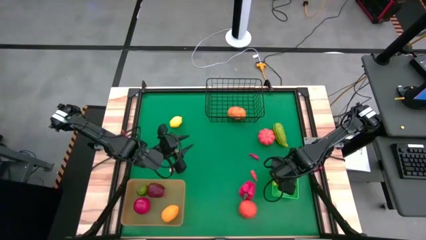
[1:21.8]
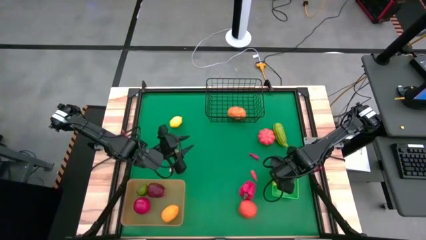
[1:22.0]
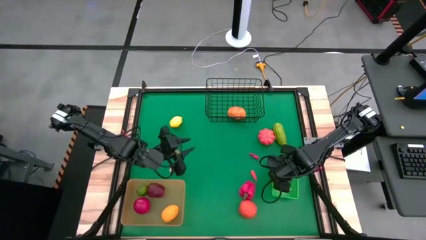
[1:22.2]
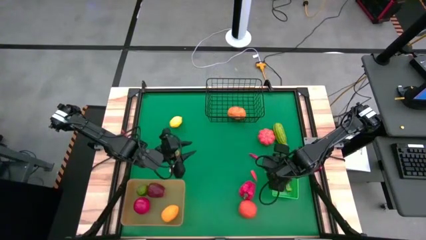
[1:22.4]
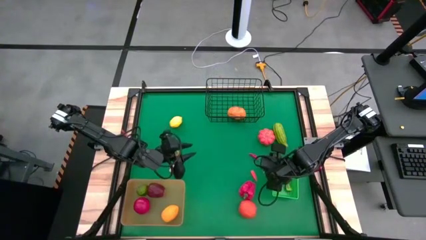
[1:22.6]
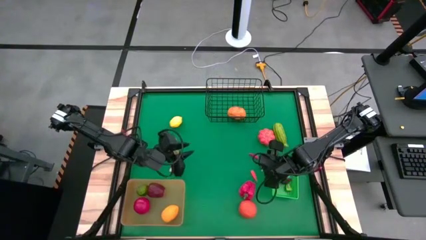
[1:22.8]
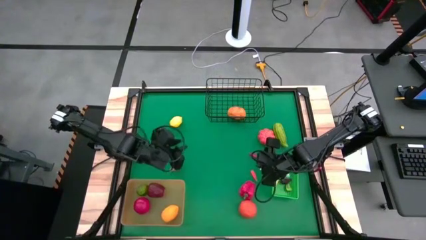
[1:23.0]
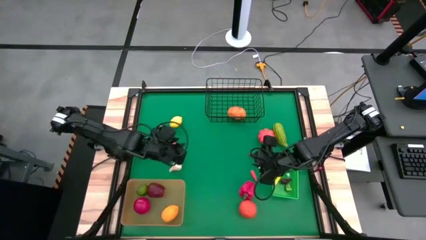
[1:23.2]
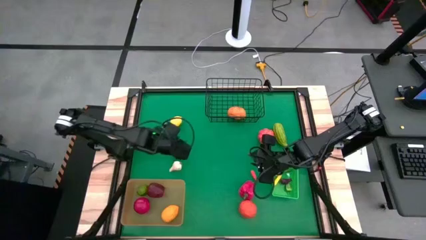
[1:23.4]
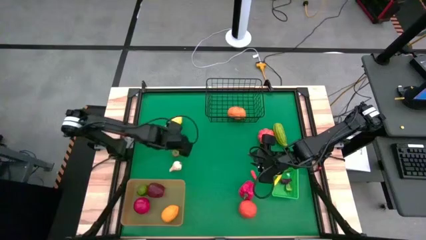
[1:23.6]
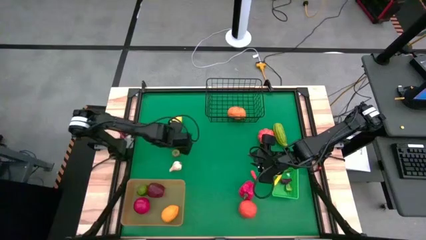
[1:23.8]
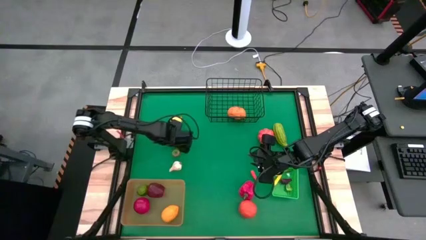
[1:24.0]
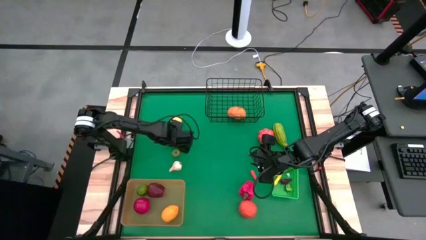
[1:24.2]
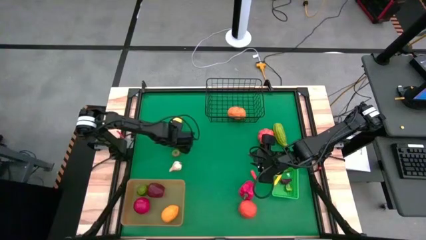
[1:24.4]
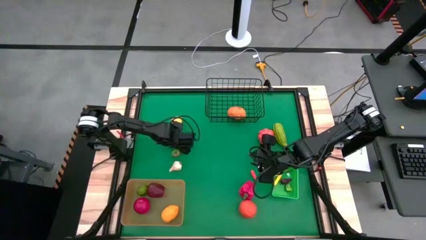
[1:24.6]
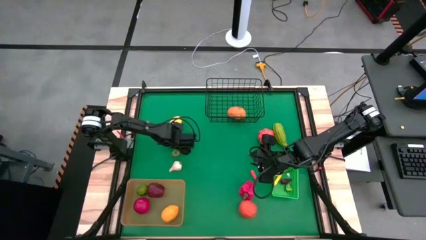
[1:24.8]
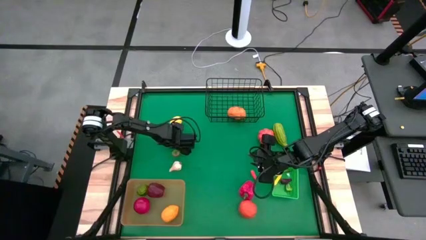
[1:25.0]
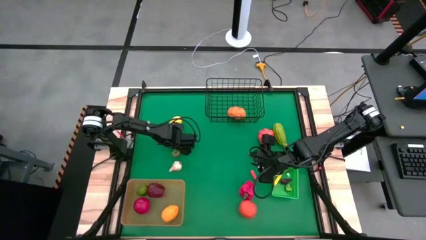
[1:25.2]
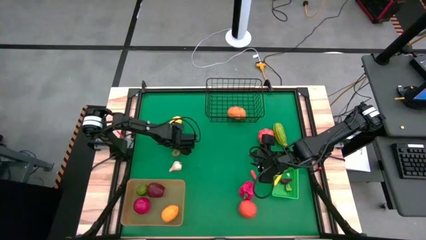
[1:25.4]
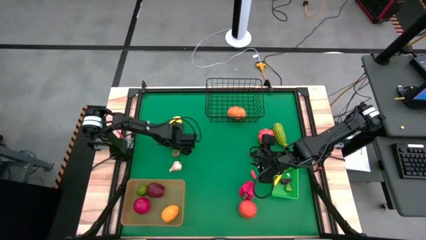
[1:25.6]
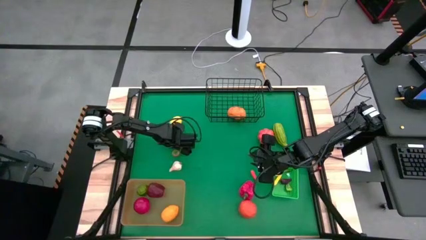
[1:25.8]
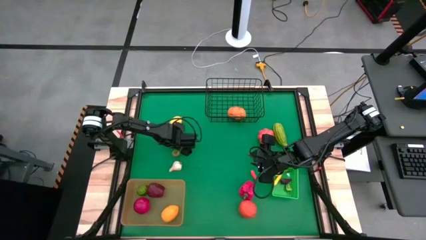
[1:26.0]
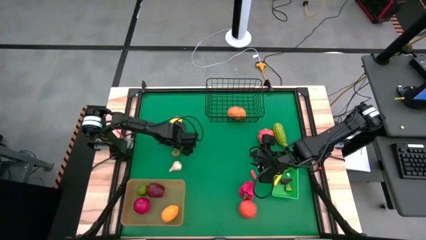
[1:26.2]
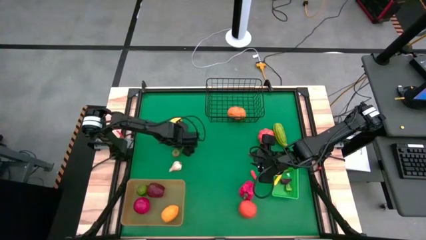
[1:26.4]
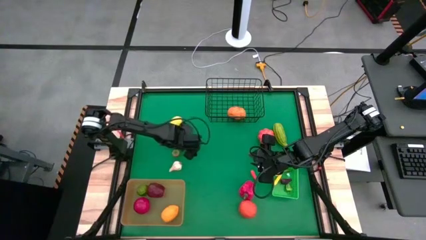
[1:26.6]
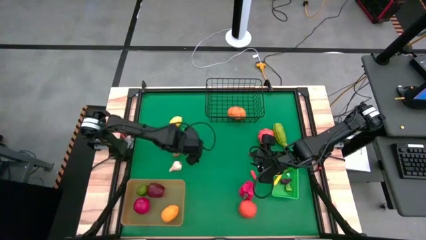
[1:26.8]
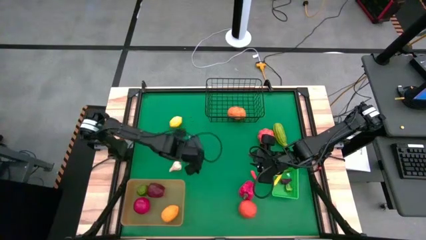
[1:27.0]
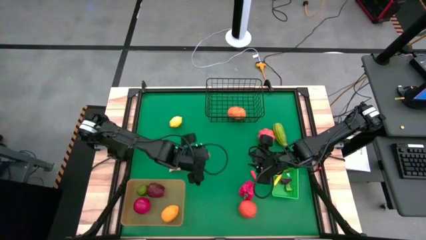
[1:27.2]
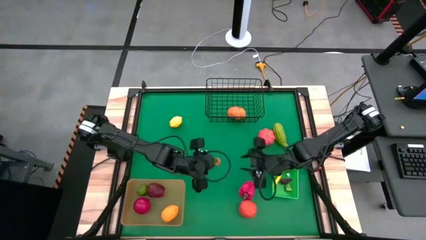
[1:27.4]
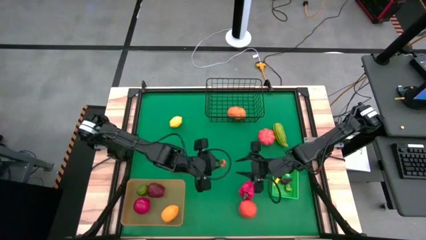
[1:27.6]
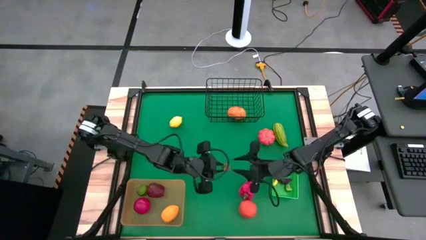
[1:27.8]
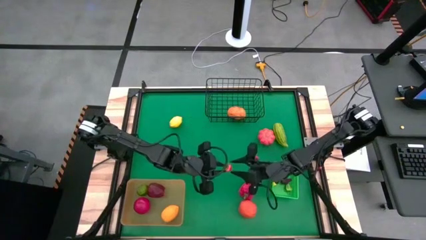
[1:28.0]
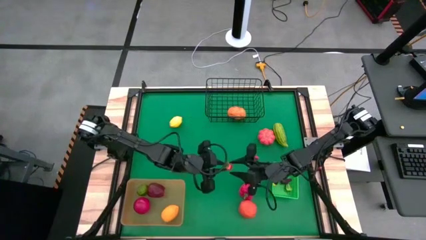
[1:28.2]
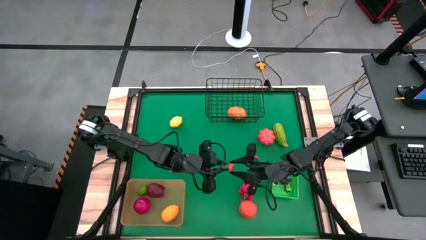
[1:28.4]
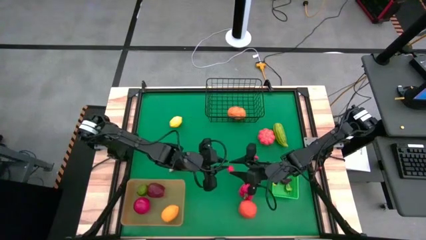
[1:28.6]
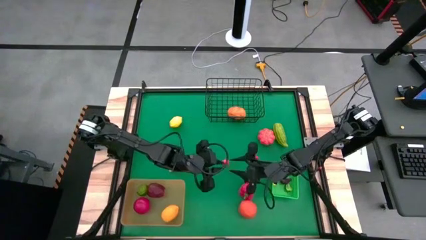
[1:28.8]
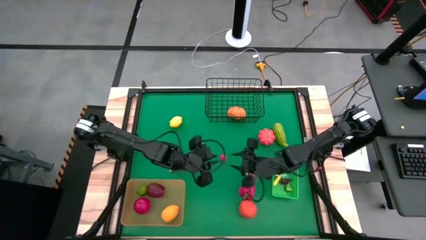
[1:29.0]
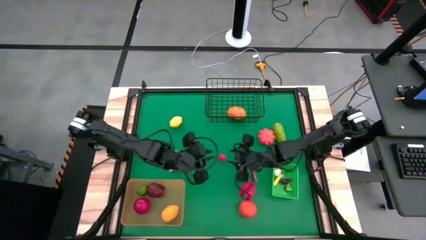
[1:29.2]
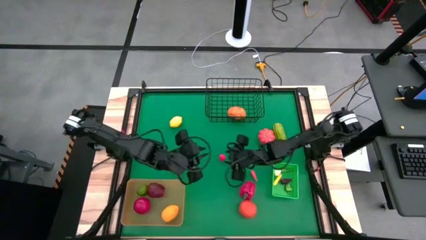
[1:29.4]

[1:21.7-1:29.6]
Task: Sort produce into baskets
Put the strawberry into the green bin

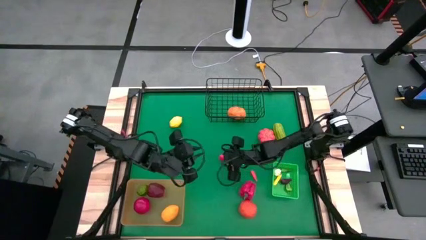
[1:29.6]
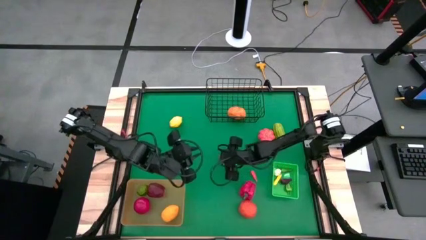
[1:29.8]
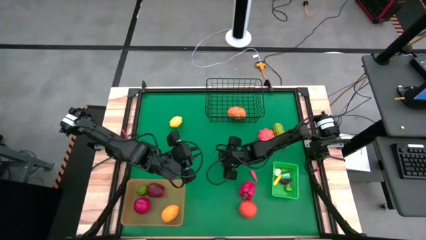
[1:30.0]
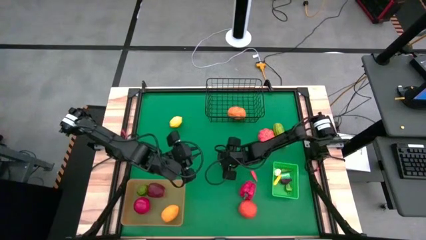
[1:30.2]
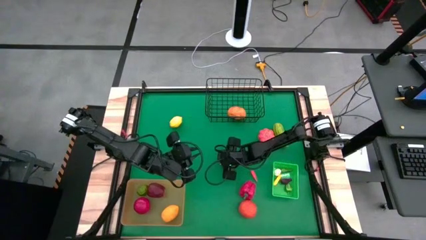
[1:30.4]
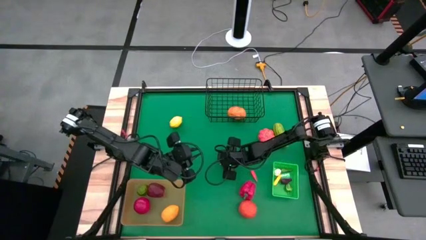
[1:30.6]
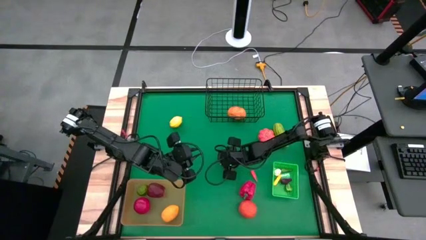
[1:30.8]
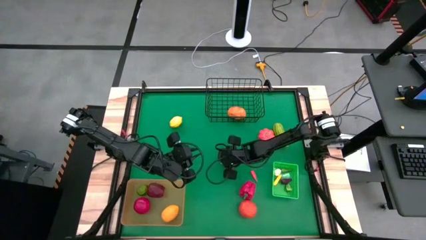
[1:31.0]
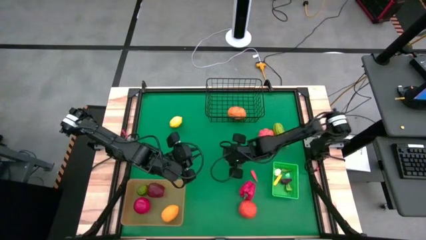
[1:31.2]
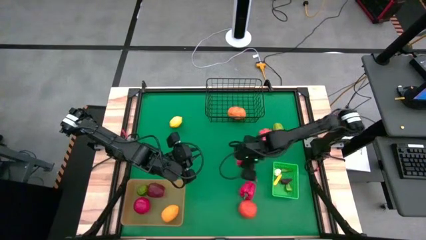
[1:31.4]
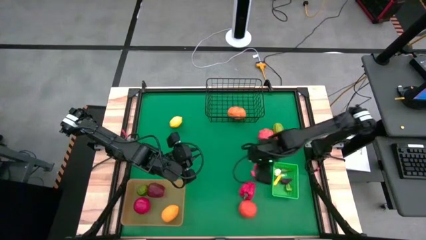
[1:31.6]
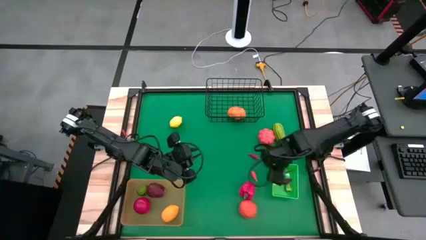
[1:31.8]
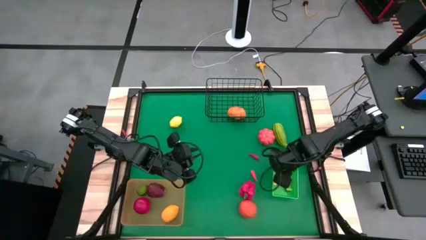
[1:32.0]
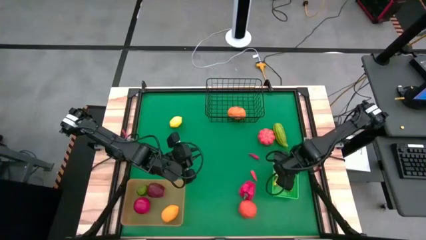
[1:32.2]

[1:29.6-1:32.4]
Put the strawberry into the green bin

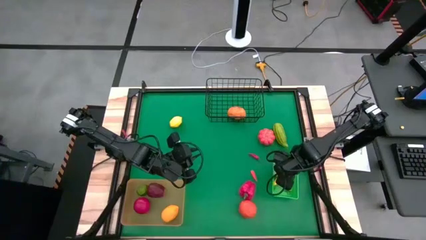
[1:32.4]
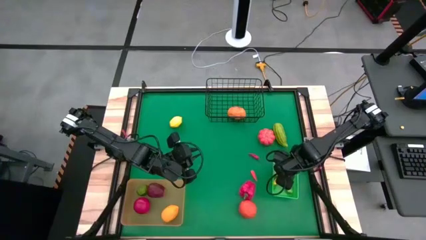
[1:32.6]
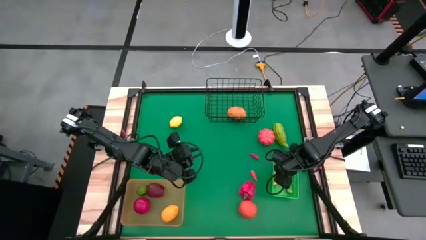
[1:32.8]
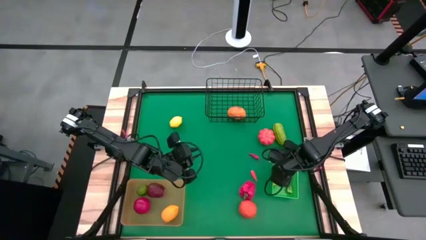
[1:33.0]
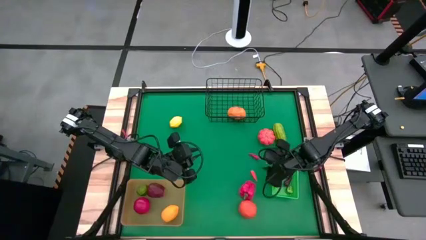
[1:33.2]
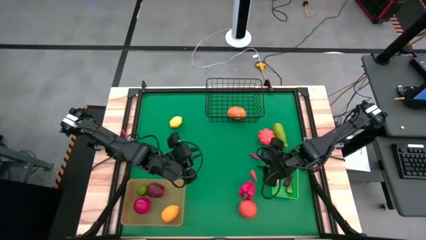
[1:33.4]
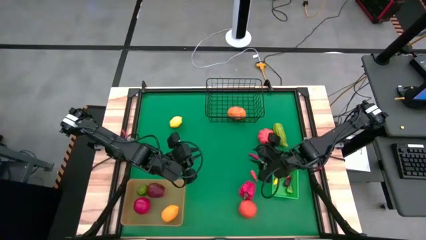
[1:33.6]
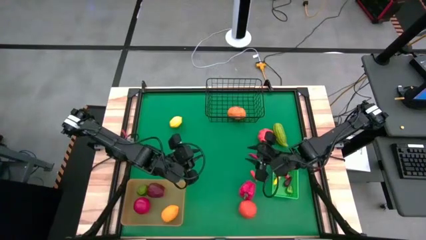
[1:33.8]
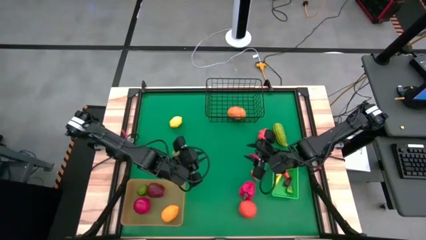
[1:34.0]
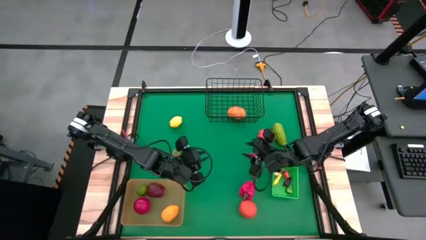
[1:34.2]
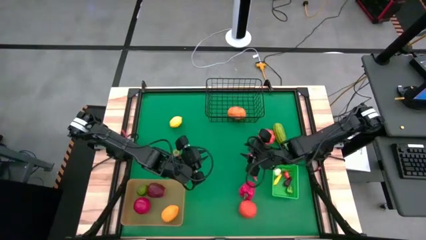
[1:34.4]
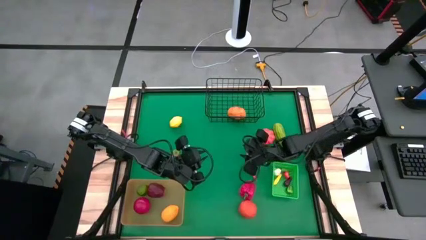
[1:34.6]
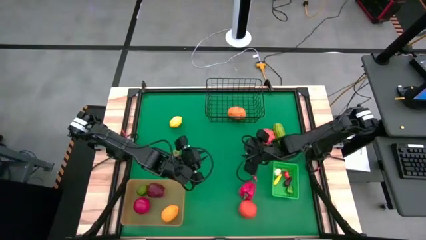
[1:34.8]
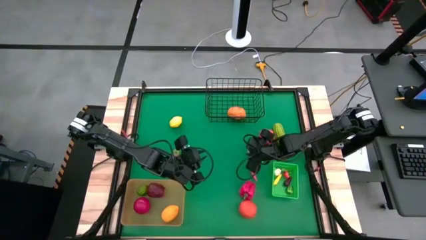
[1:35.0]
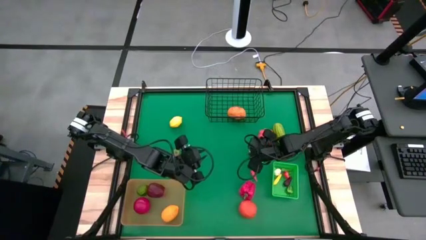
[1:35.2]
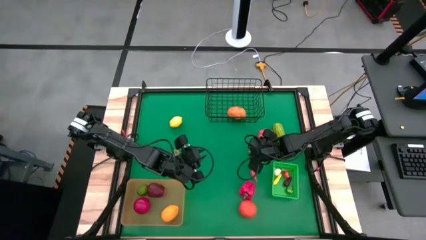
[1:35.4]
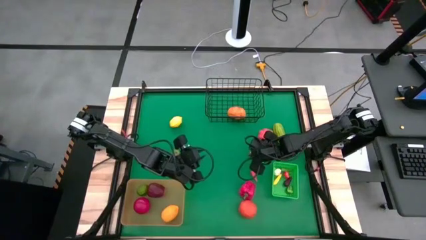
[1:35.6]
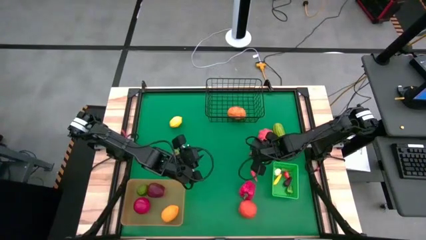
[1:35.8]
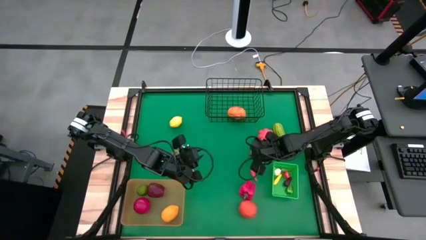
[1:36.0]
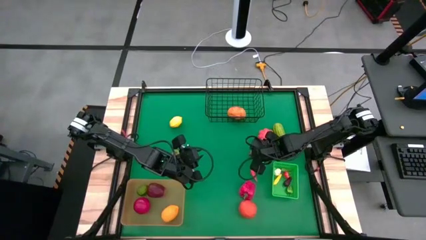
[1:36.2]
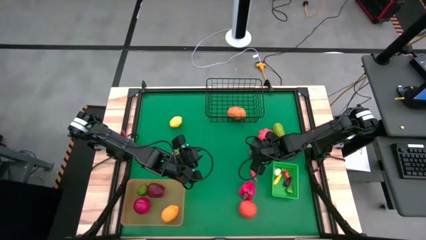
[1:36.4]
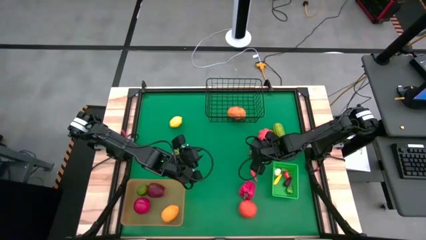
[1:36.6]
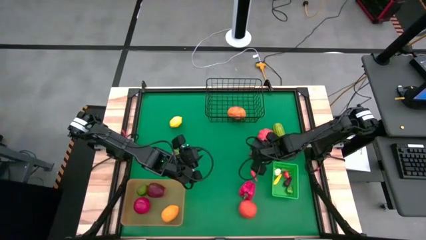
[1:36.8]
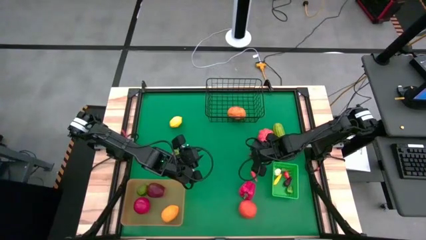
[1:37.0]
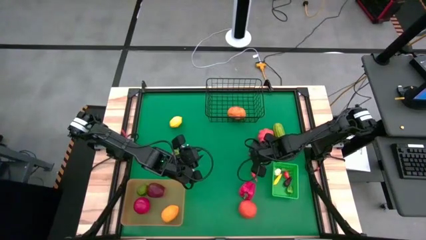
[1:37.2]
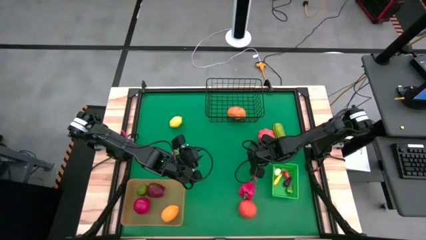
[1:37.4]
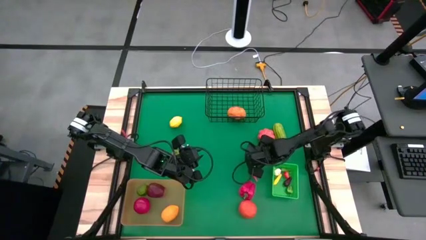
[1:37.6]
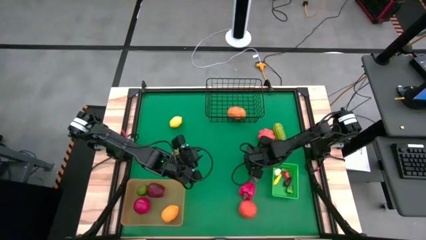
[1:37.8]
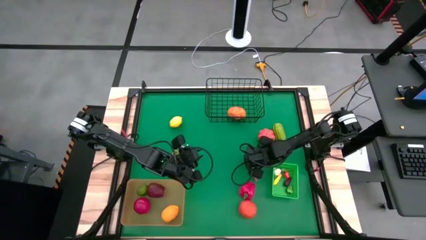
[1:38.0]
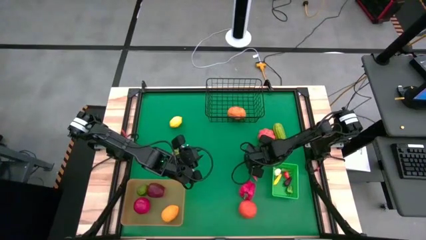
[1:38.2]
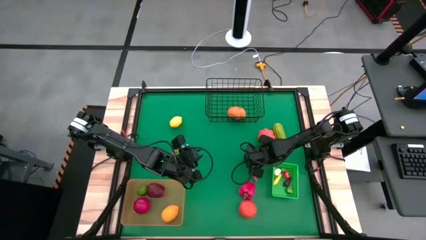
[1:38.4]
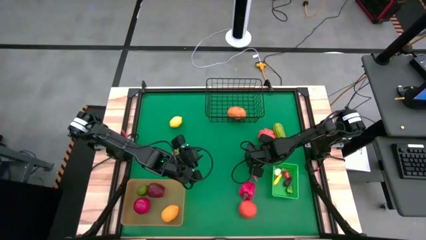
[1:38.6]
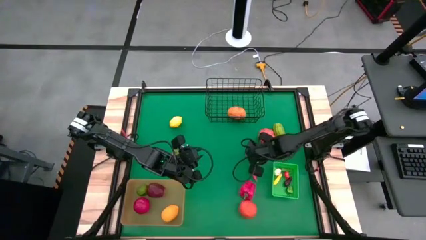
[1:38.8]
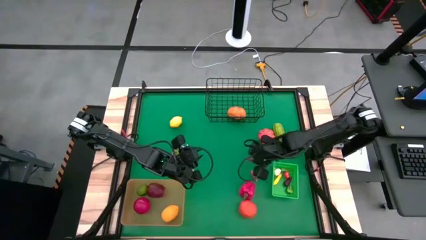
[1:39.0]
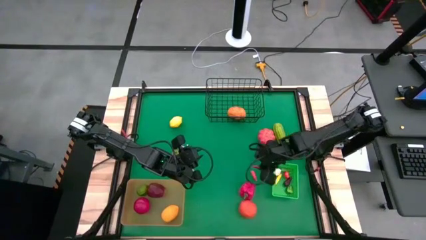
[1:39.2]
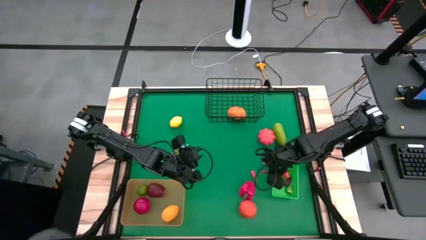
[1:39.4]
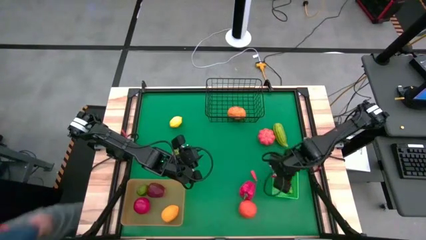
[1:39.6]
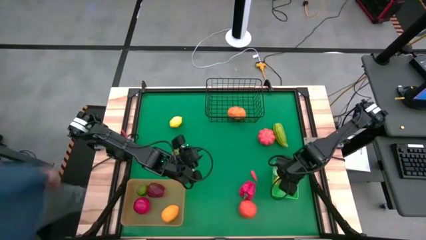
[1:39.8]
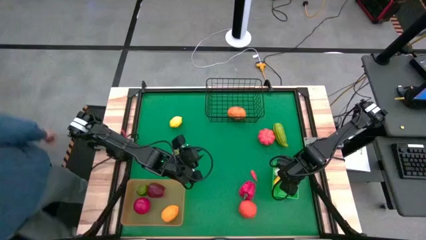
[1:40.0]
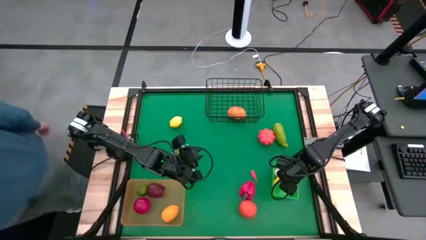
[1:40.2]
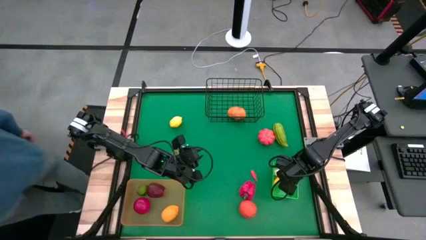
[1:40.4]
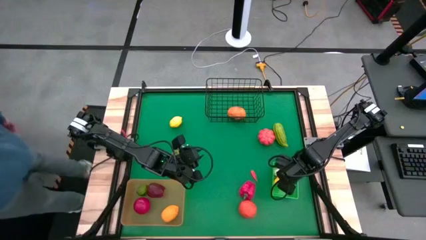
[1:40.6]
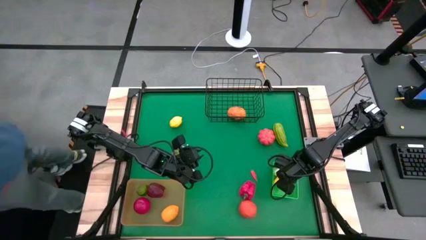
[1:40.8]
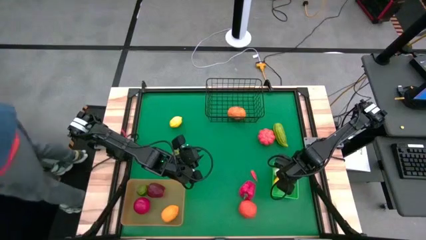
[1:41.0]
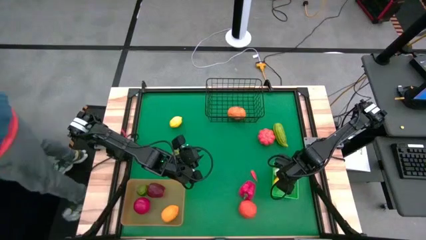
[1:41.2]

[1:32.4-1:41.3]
Put the red chili pepper into the green bin
